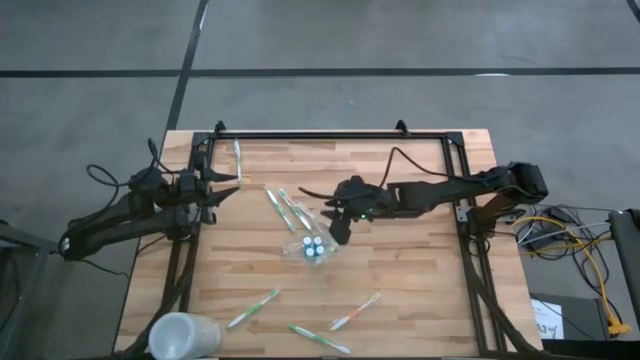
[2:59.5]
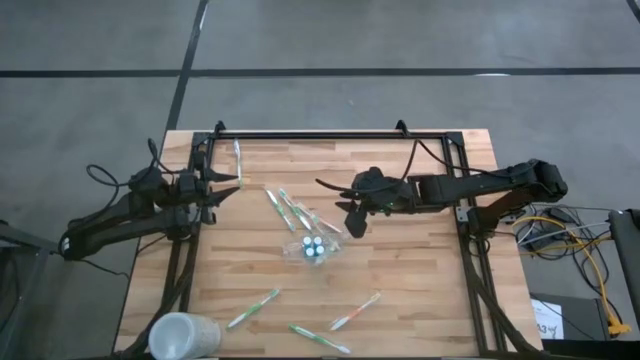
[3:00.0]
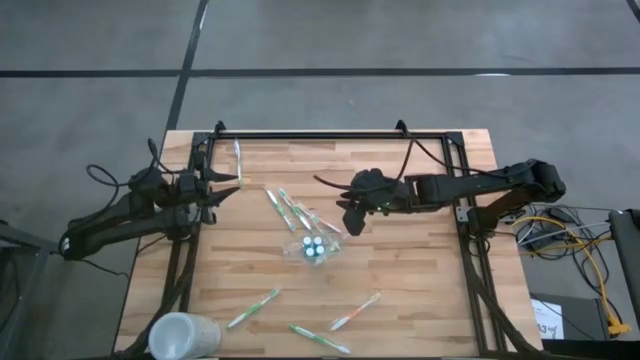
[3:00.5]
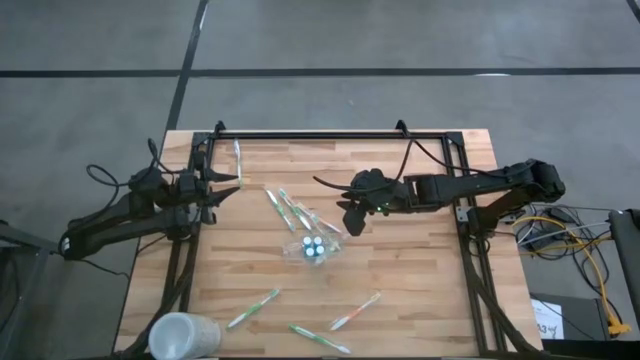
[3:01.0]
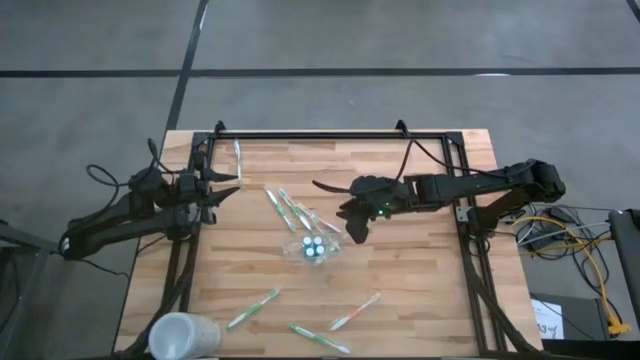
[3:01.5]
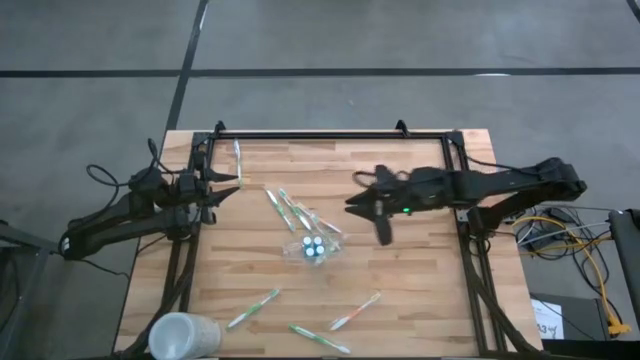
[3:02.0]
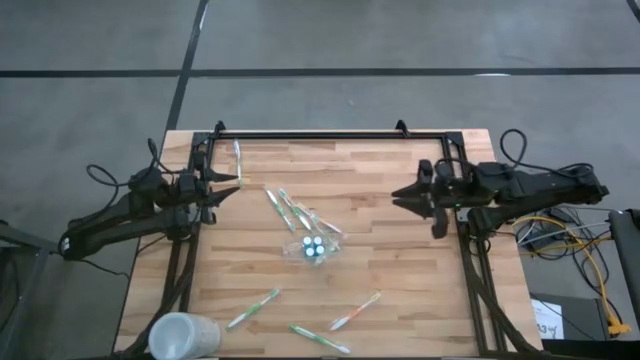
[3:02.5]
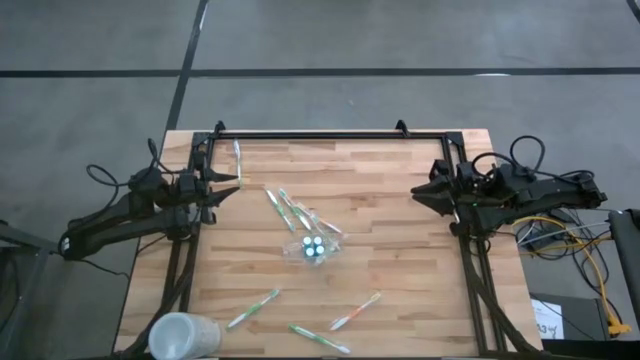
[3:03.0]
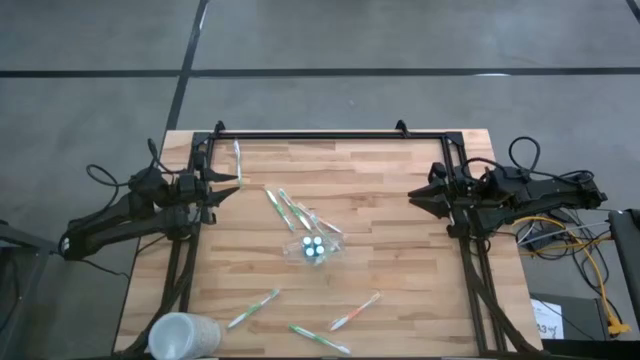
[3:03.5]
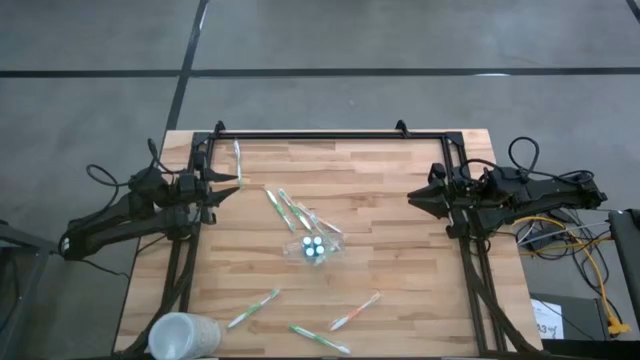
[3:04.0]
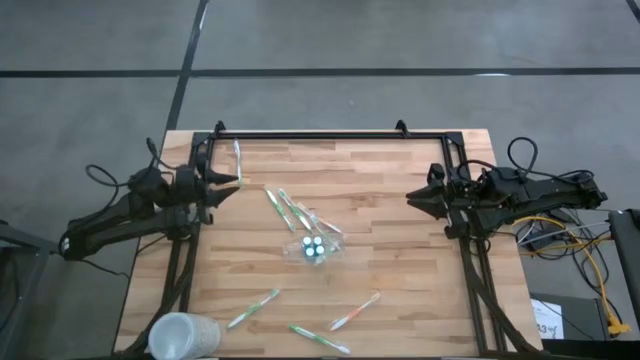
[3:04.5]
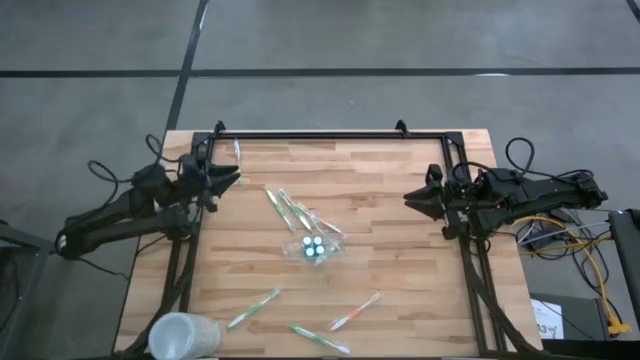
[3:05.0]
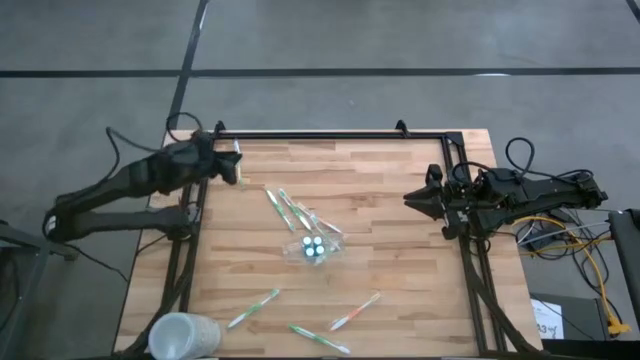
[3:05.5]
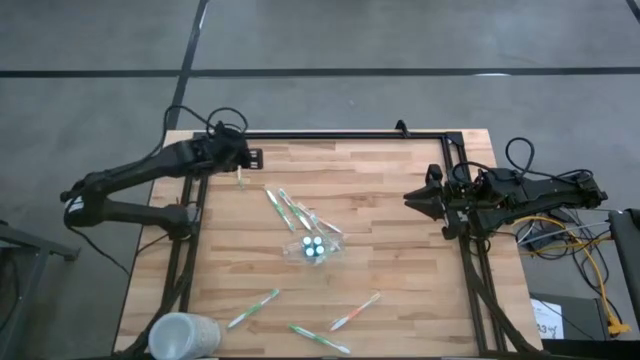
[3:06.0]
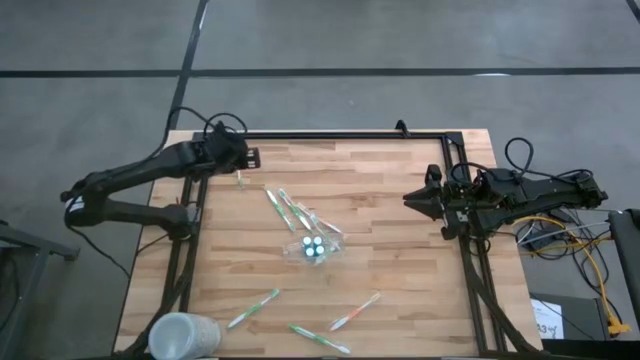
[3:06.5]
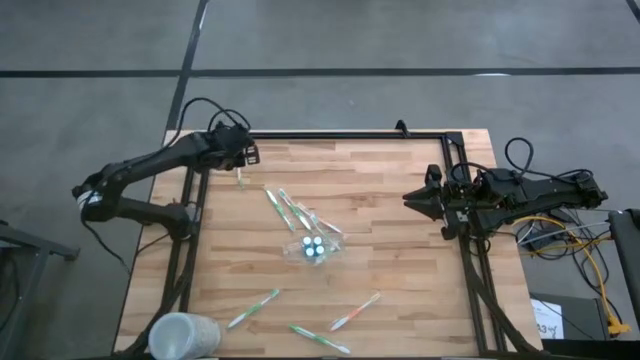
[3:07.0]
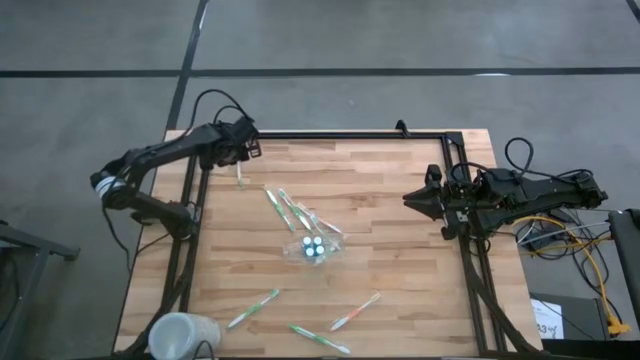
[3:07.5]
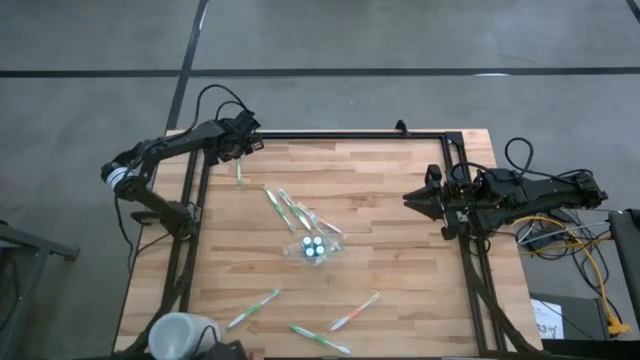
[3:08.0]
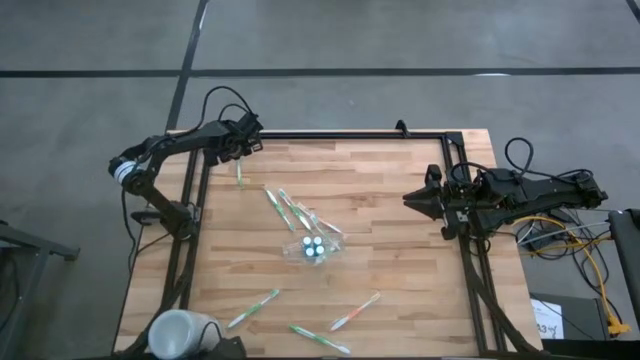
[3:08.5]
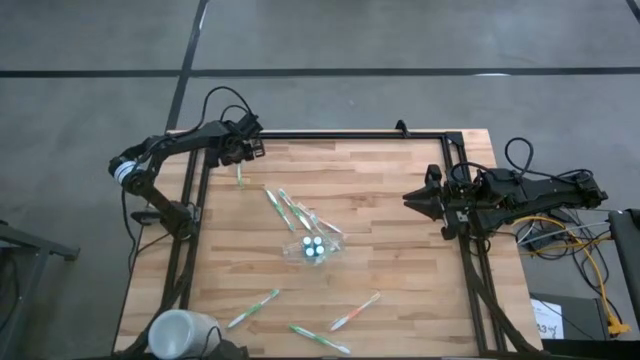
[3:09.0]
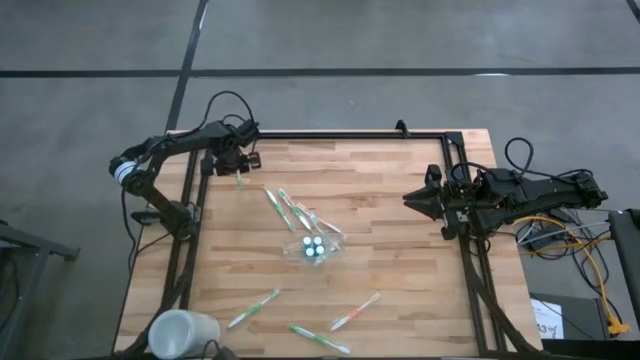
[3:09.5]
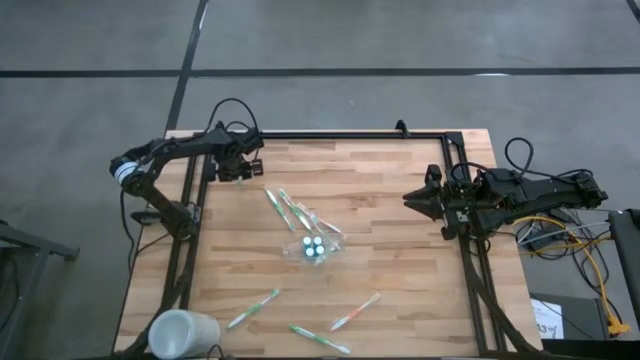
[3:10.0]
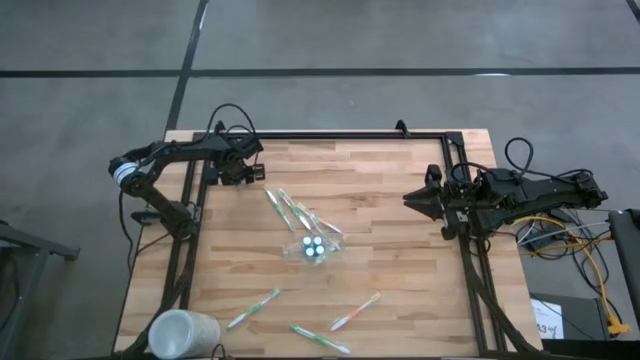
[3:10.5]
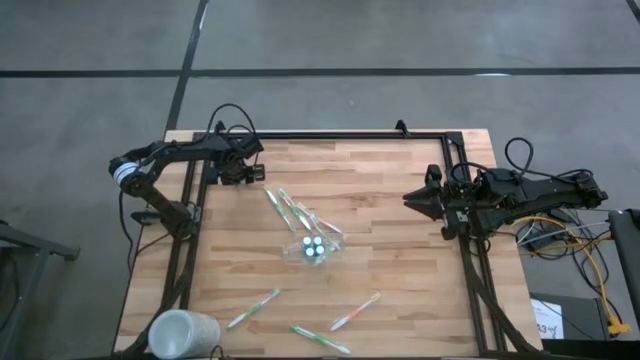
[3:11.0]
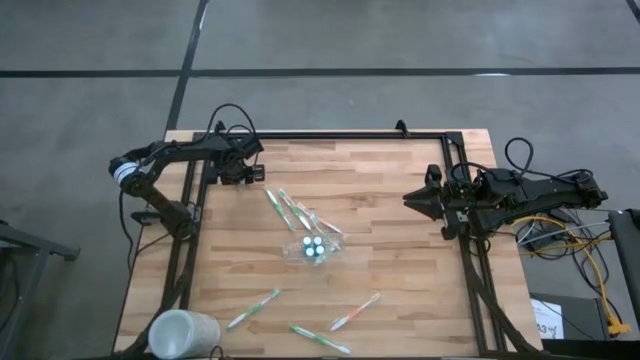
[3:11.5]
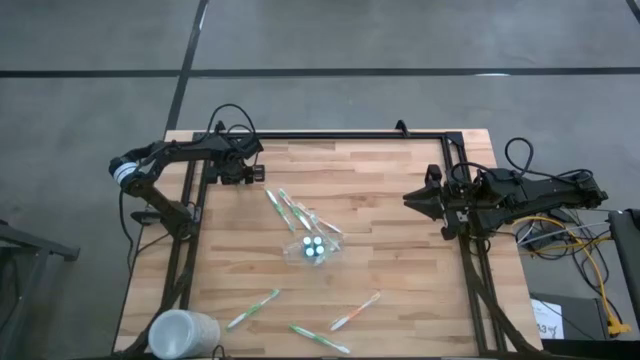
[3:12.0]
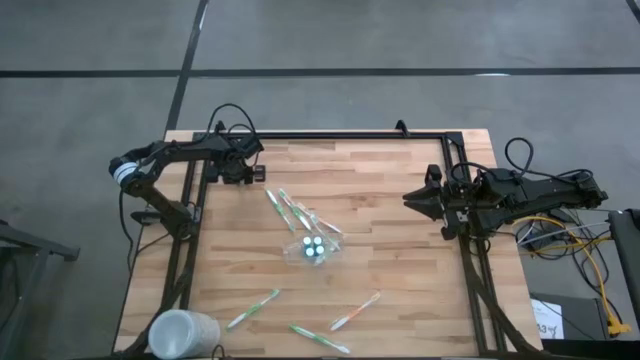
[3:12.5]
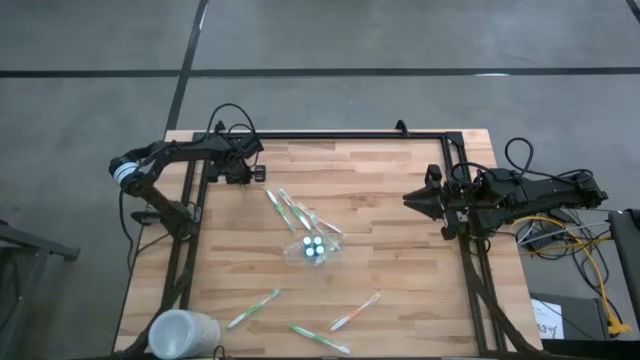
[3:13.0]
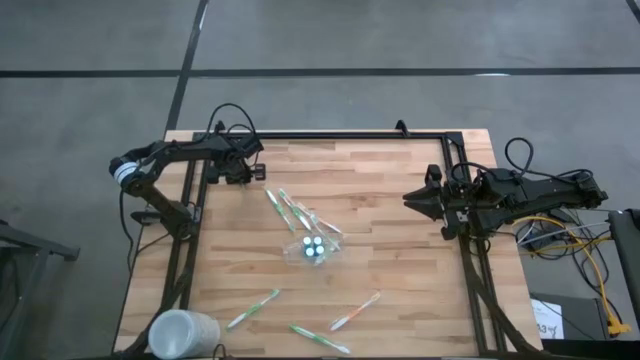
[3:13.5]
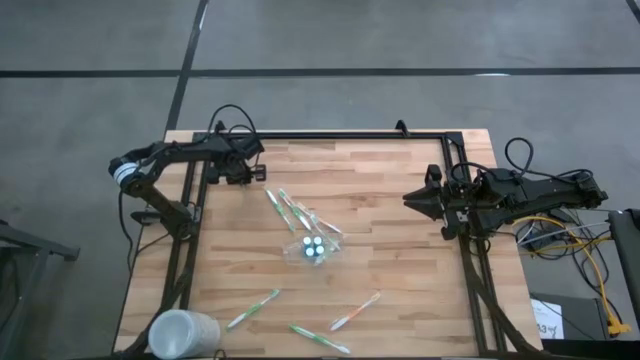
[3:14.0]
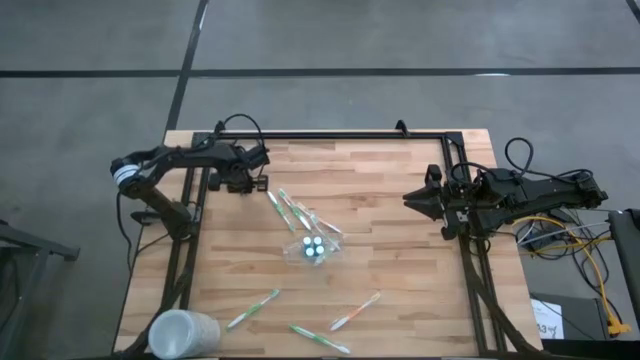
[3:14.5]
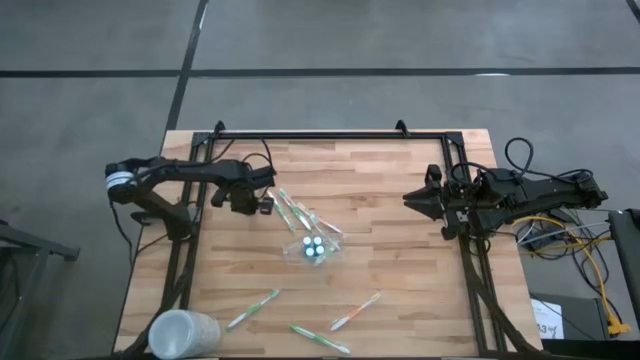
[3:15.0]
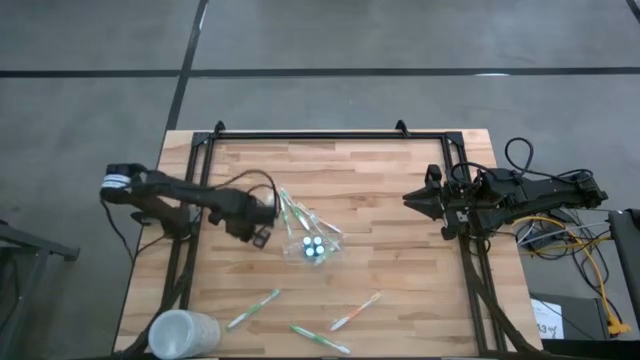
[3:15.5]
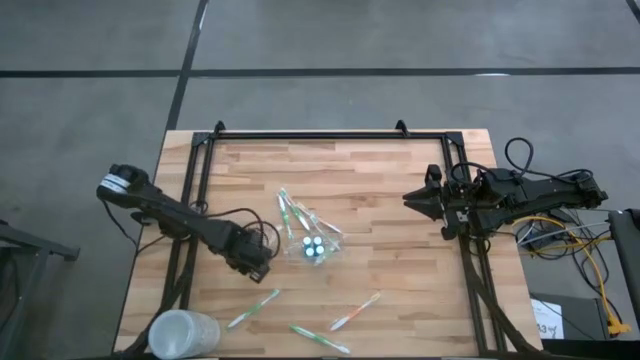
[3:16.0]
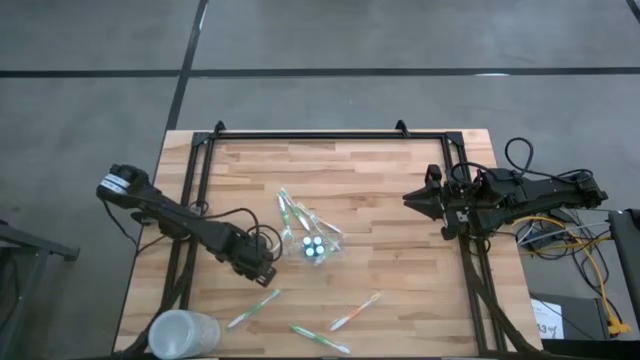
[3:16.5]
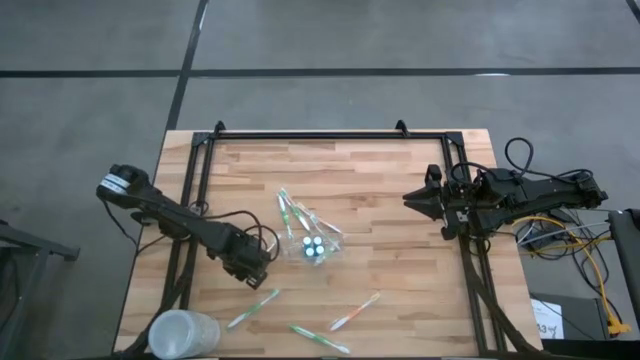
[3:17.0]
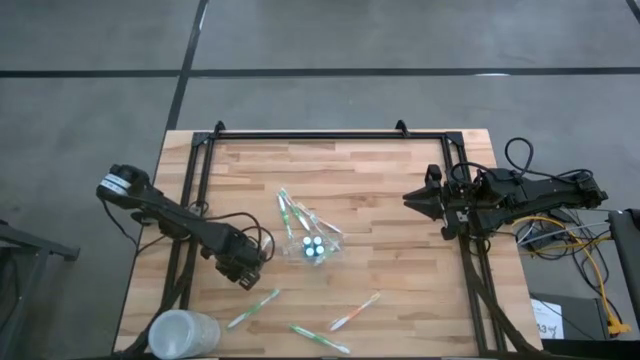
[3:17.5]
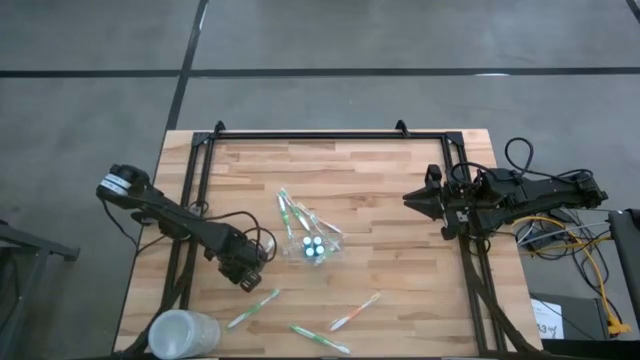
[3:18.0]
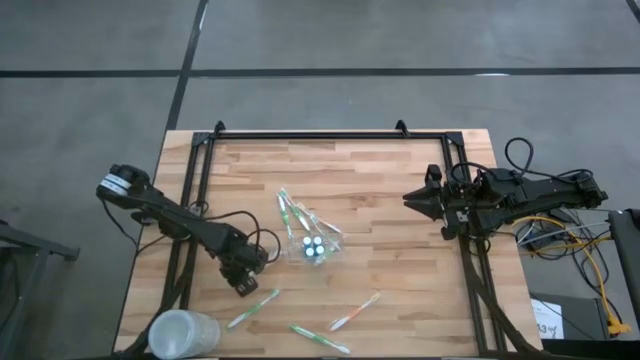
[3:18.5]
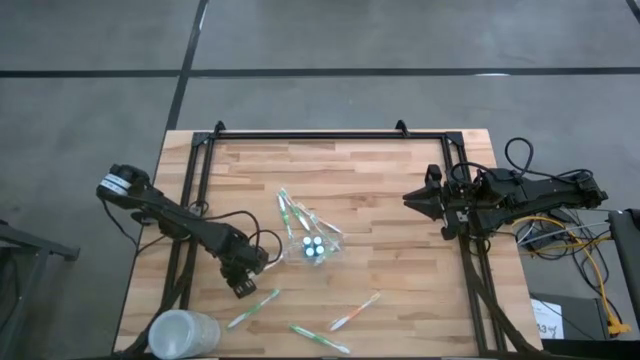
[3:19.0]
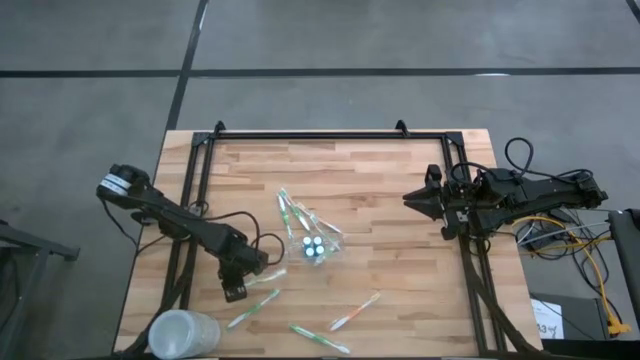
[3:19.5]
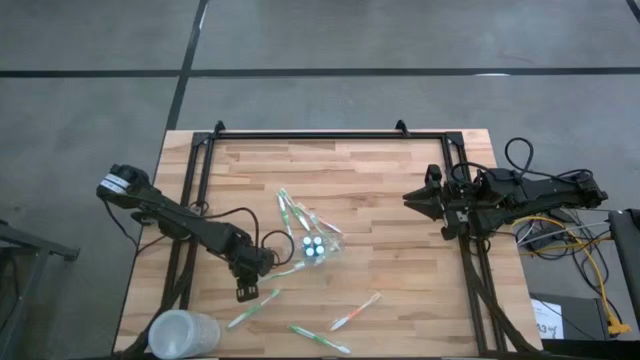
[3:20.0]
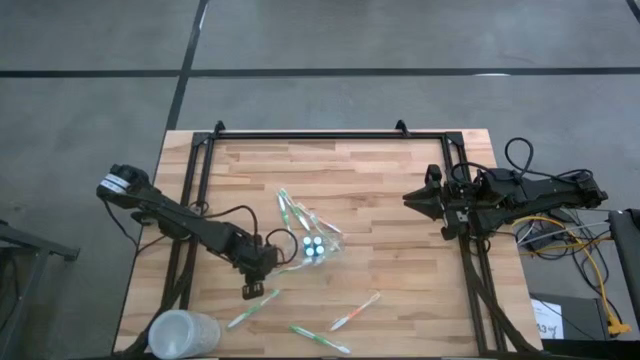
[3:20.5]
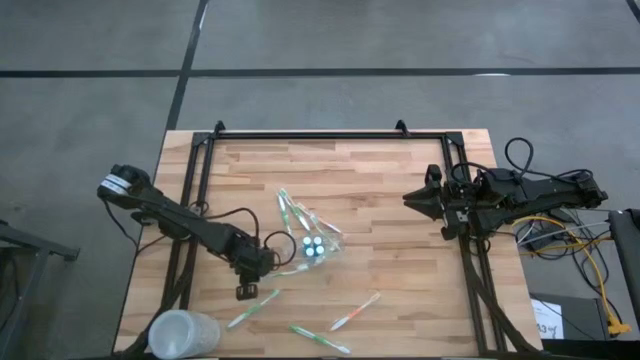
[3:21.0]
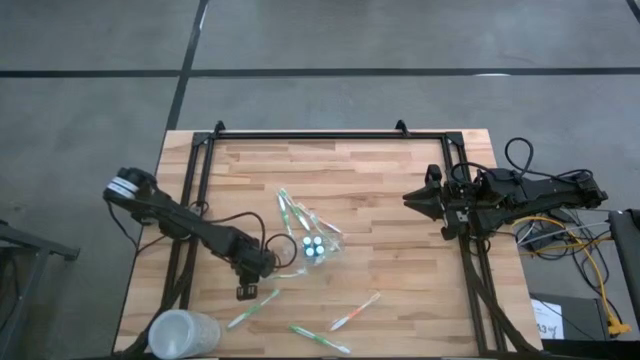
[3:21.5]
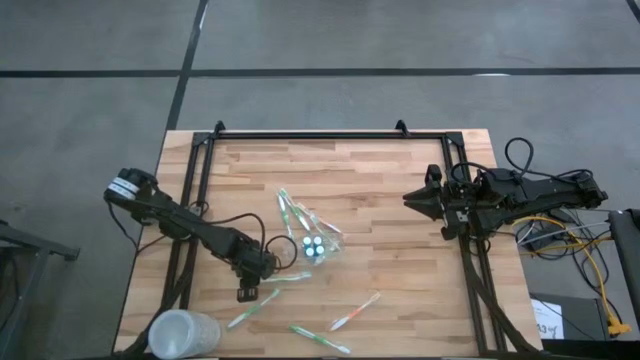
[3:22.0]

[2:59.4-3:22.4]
Task: Pick & Place toothbrushing station
Move the green toothbrush on the table
